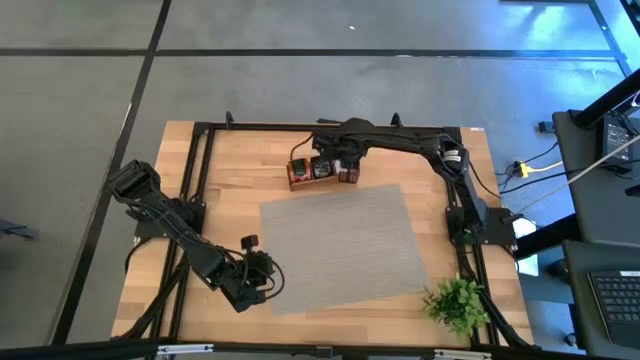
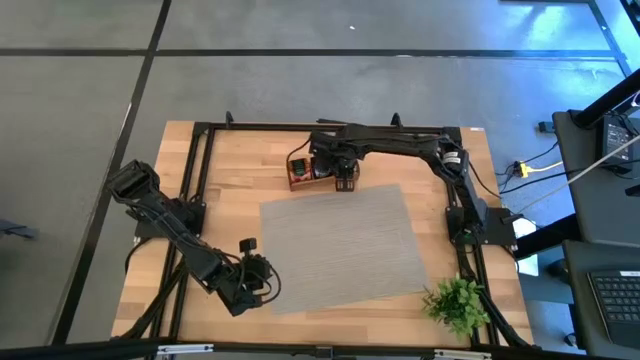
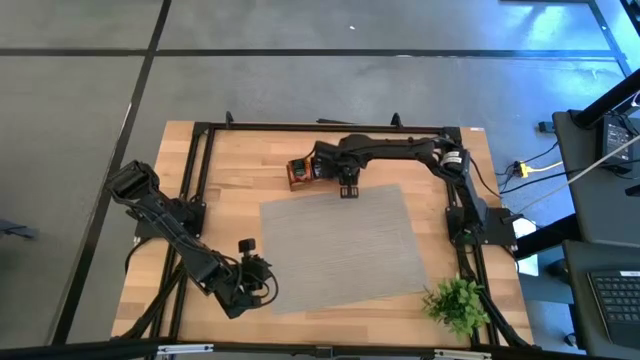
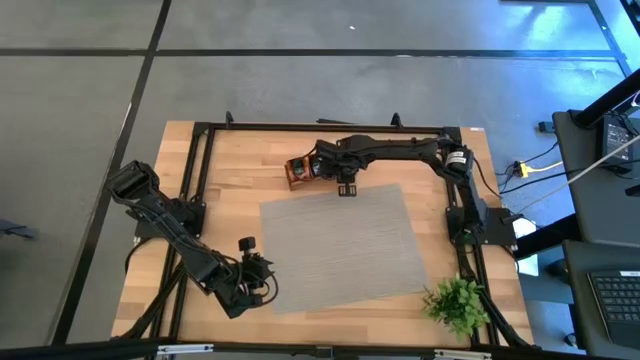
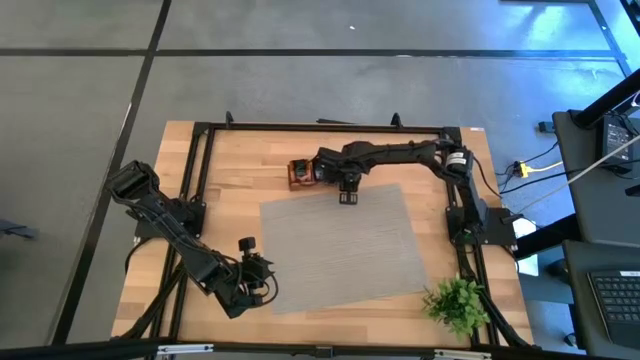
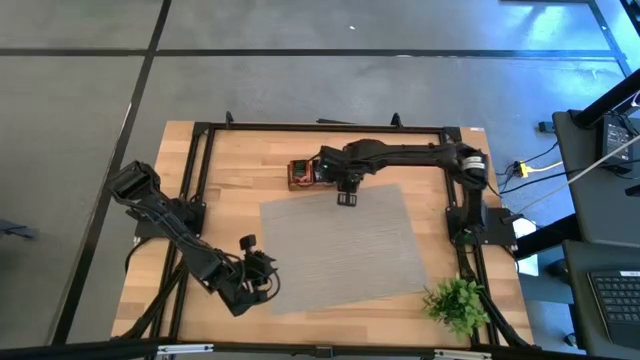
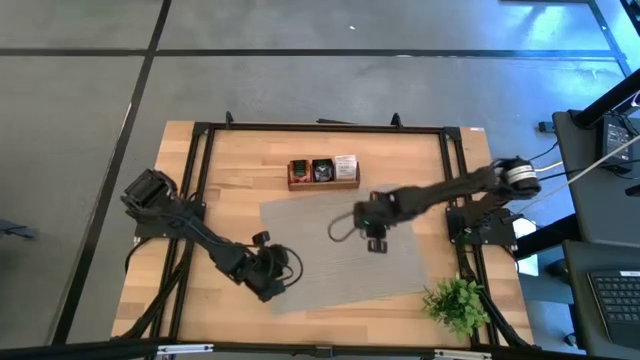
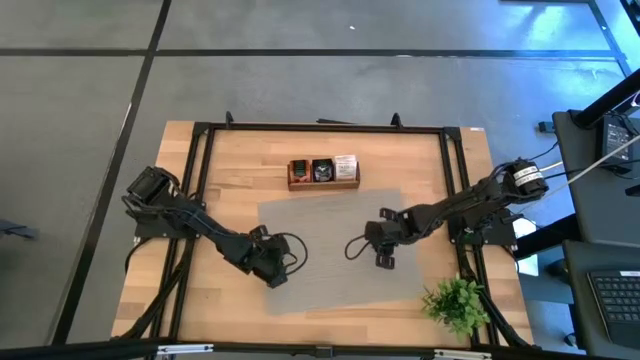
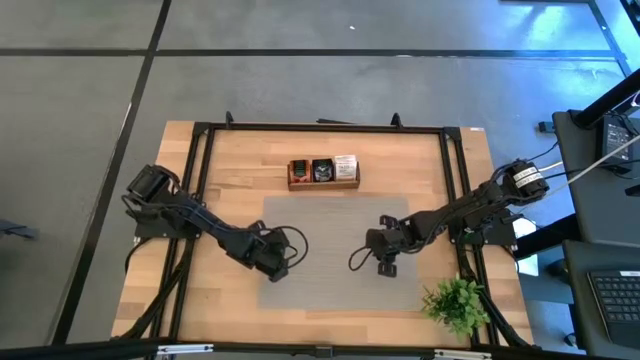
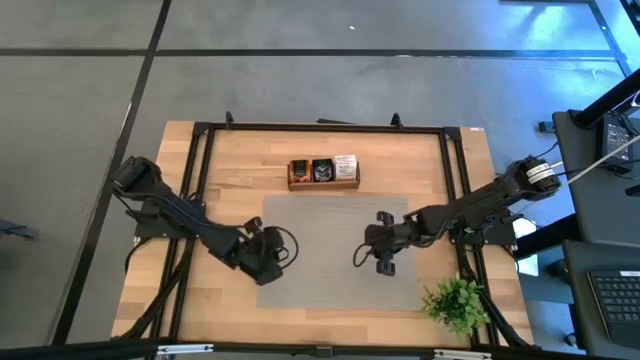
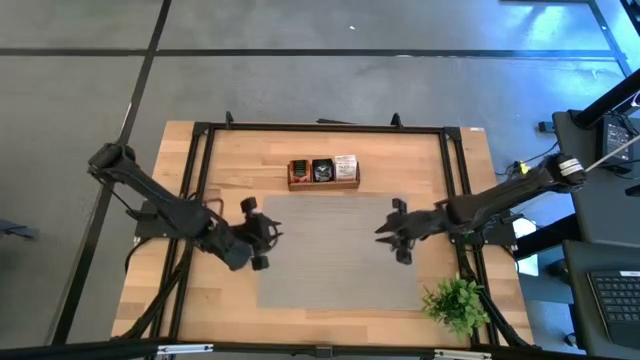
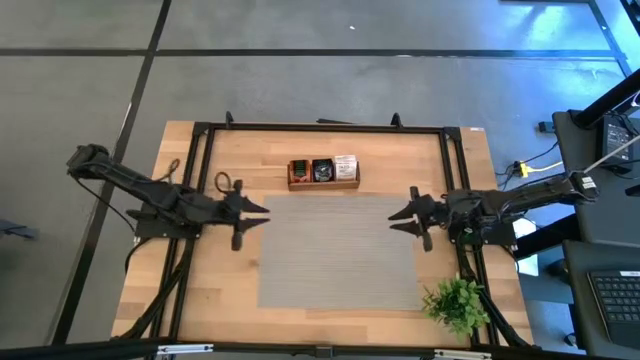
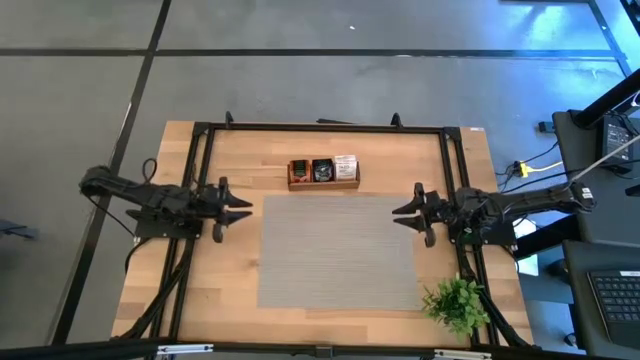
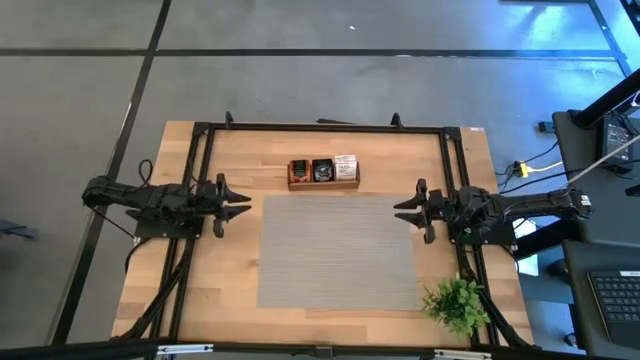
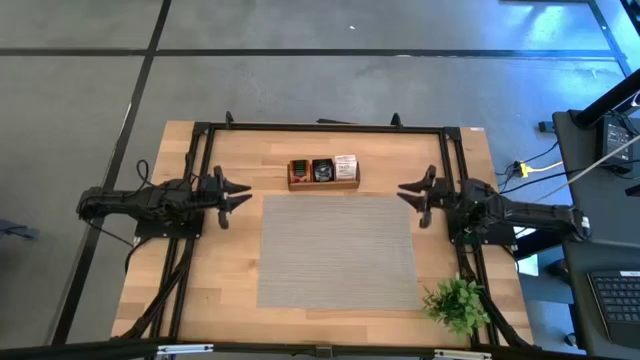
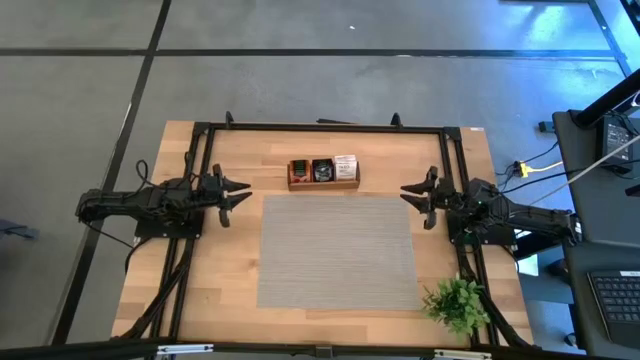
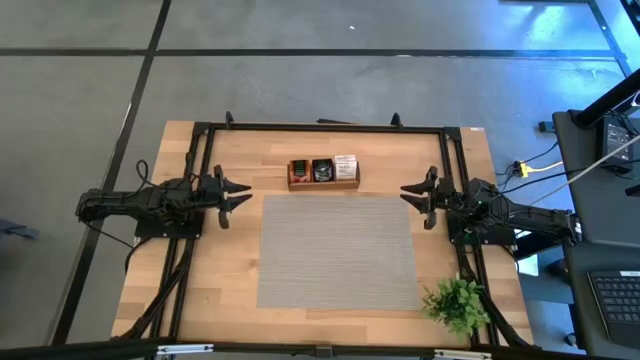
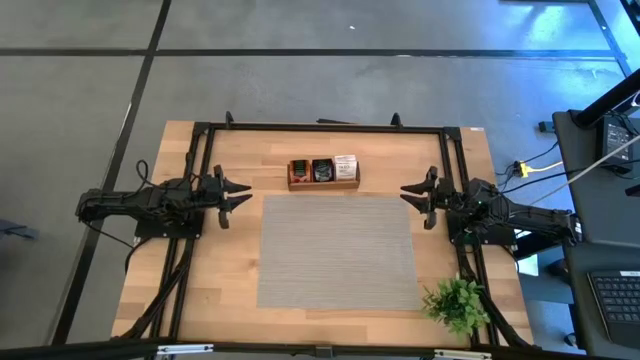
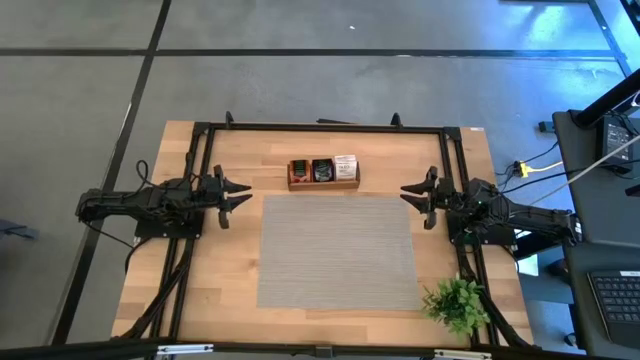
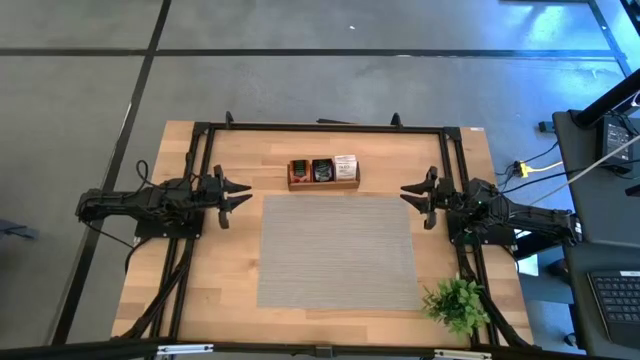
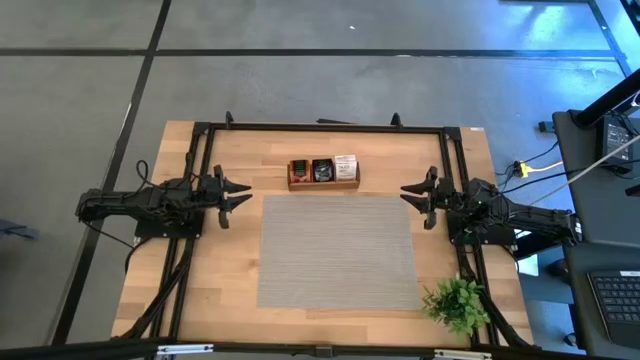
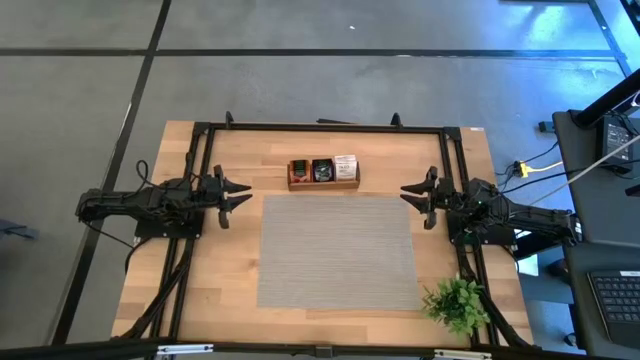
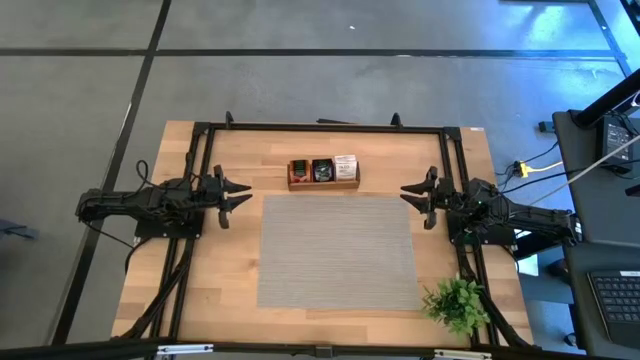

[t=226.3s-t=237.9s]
Task: Pick & Place Tea
Return to Home Position

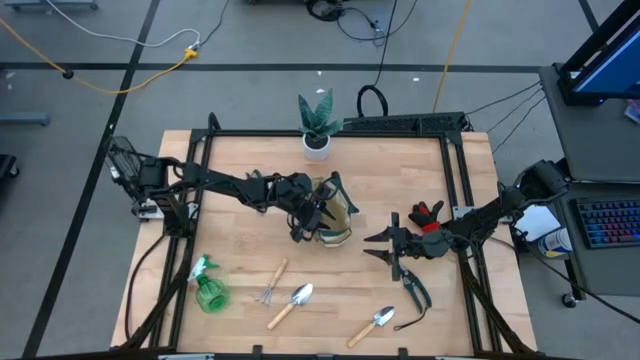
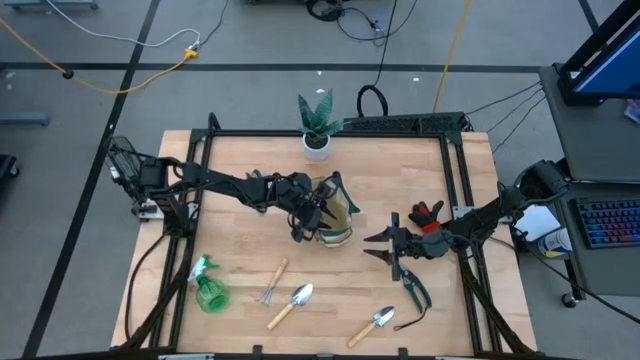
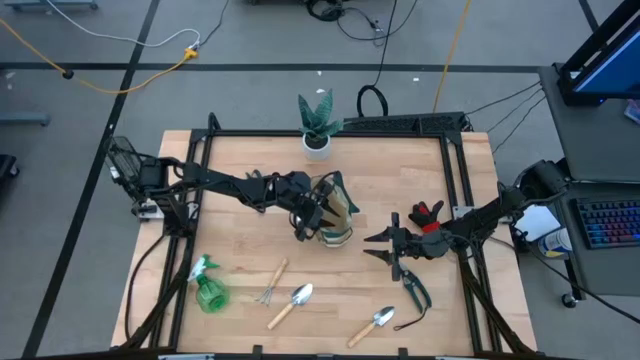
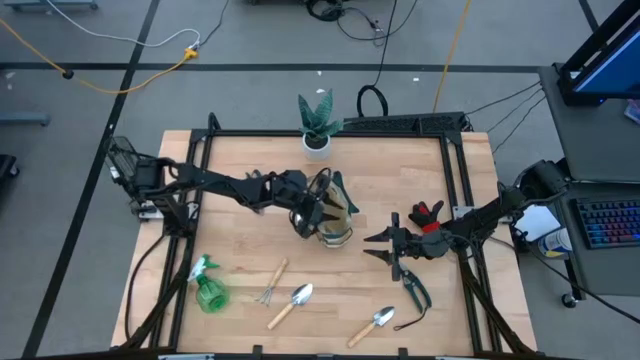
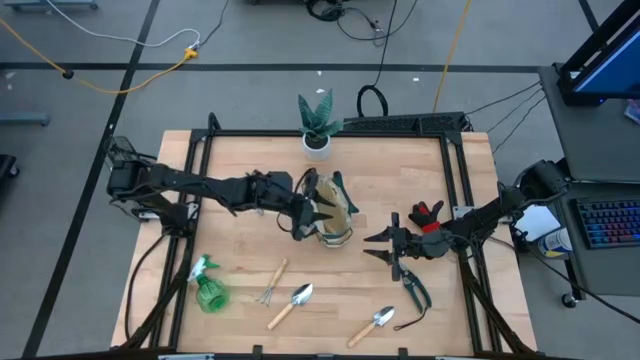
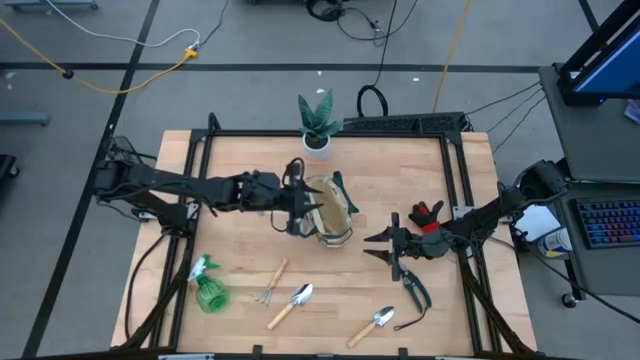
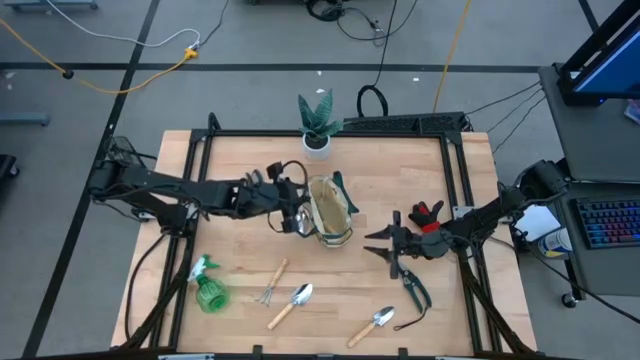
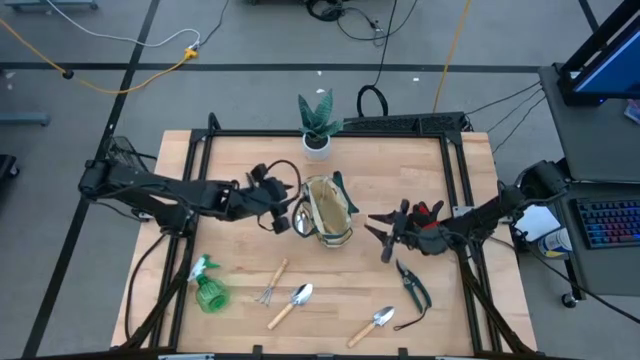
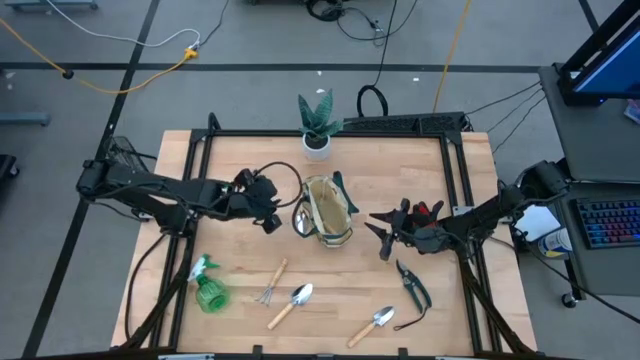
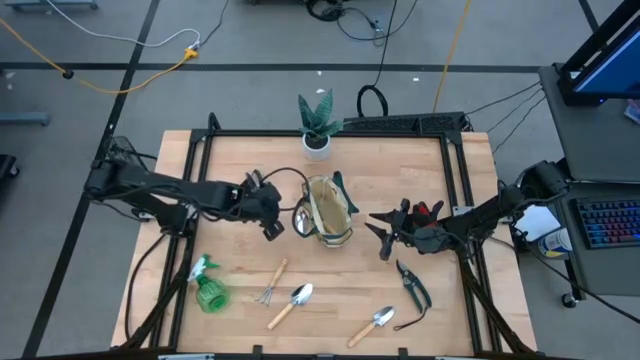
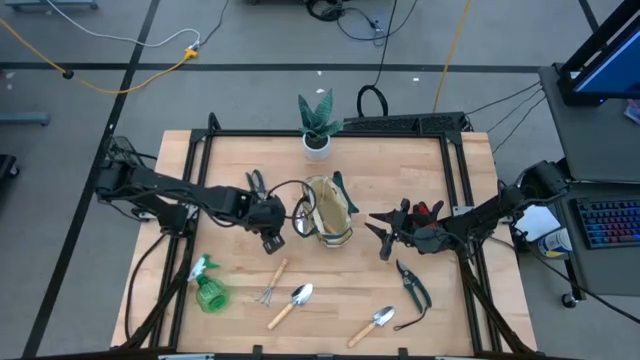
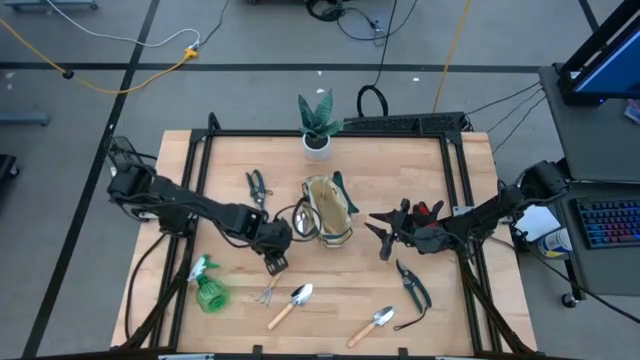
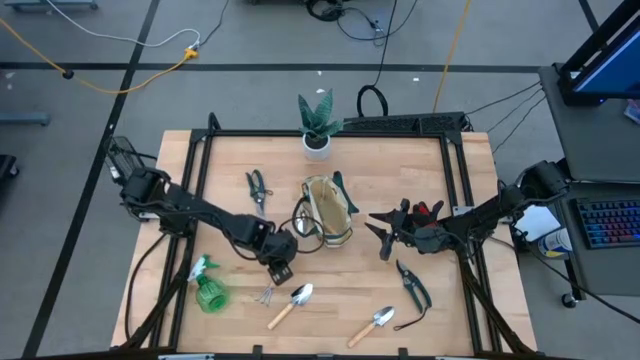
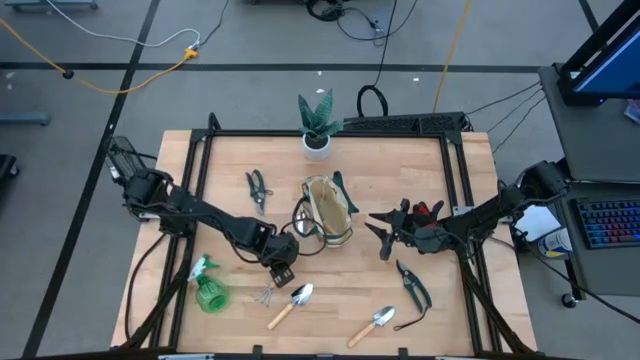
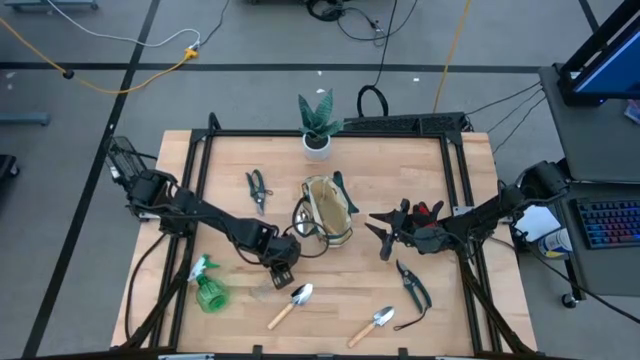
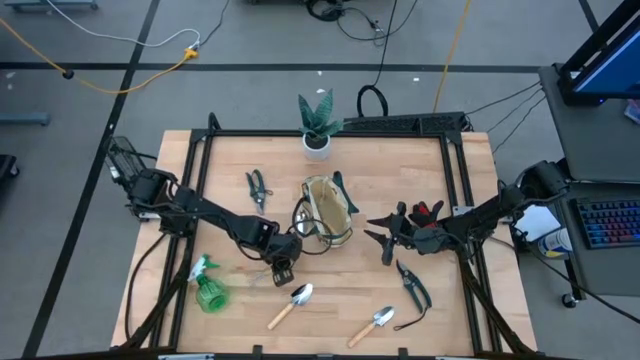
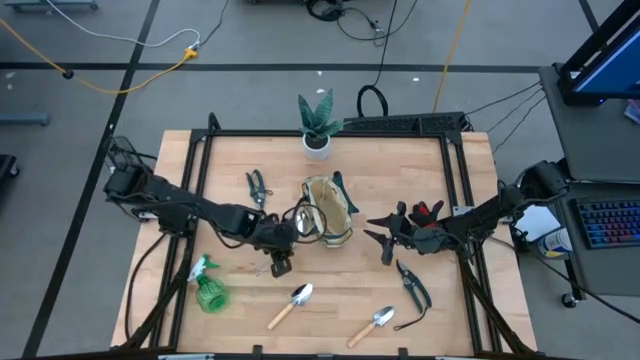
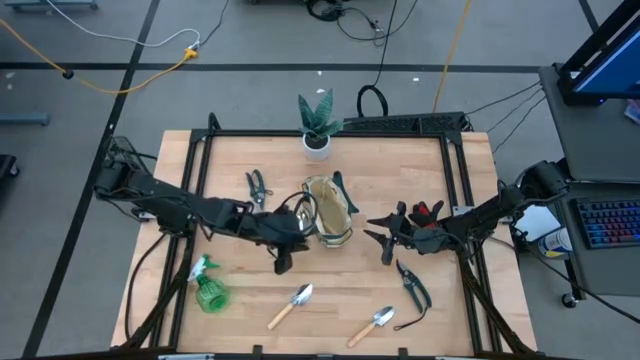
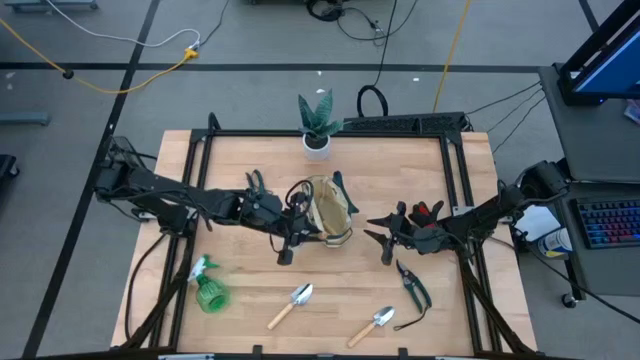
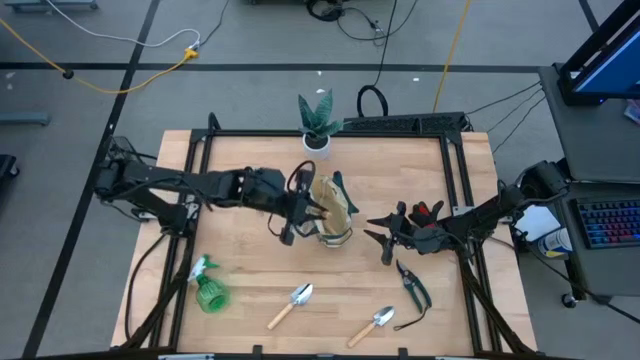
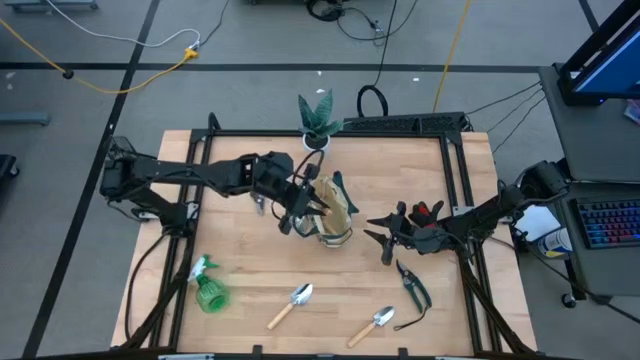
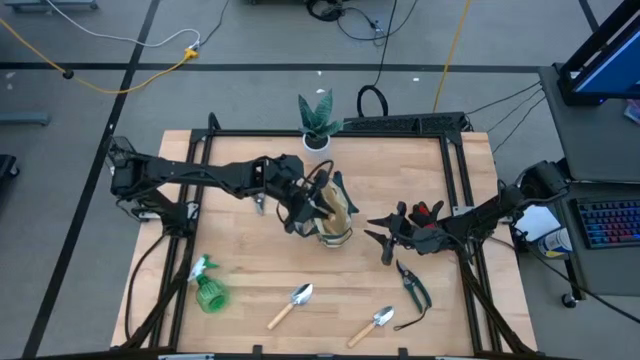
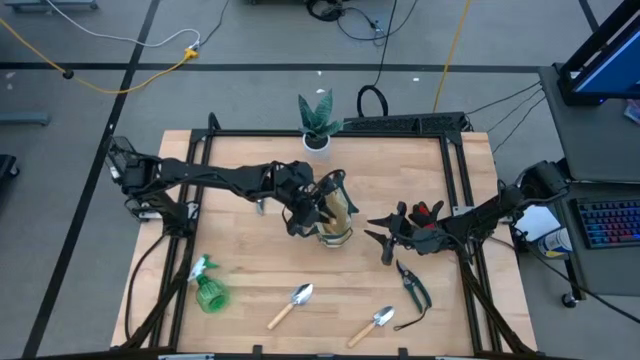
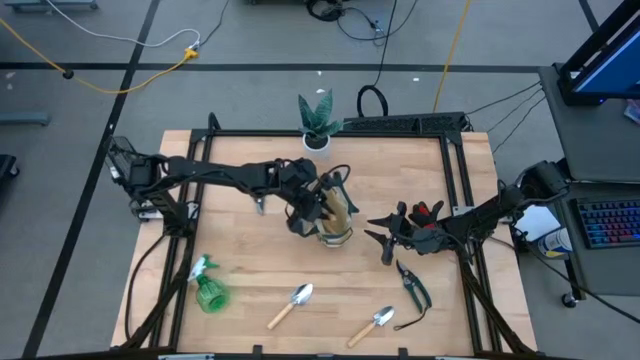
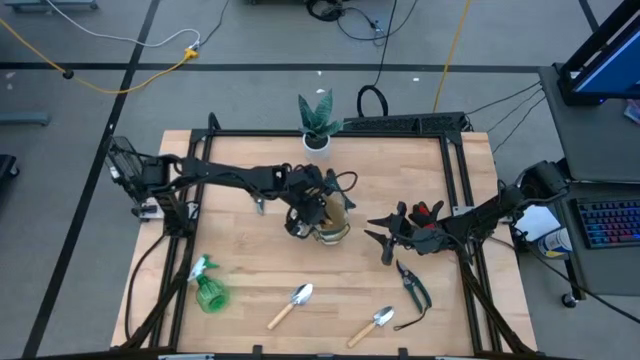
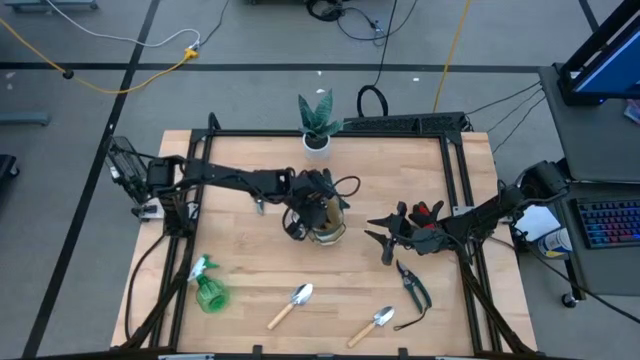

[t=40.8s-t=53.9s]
Task: Pick & Place Garden tools in Gardening bag
Put the brown hand rake into the gardening bag
